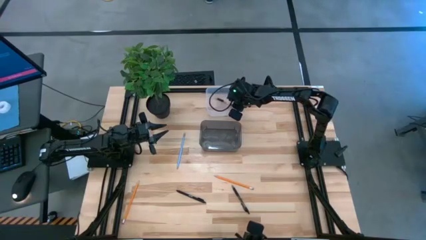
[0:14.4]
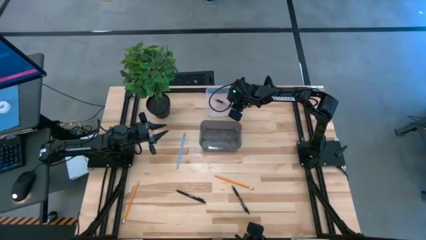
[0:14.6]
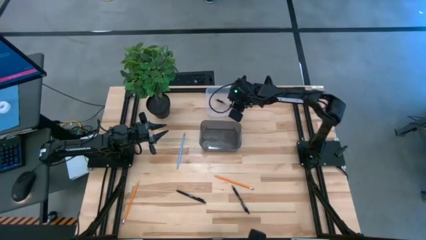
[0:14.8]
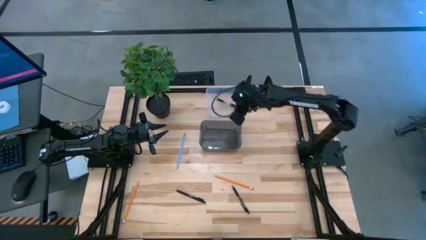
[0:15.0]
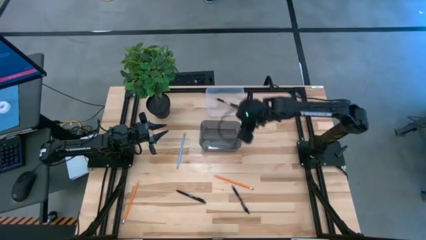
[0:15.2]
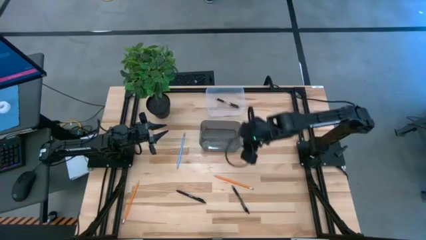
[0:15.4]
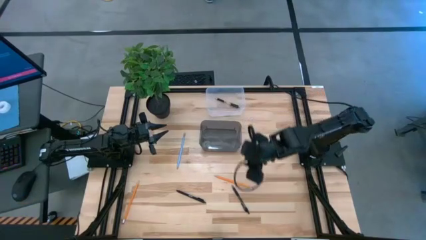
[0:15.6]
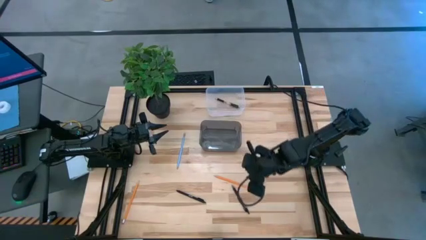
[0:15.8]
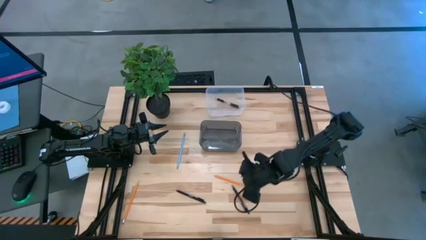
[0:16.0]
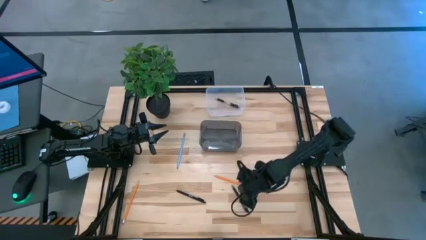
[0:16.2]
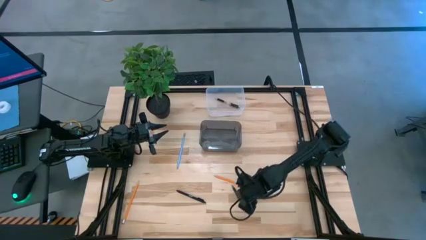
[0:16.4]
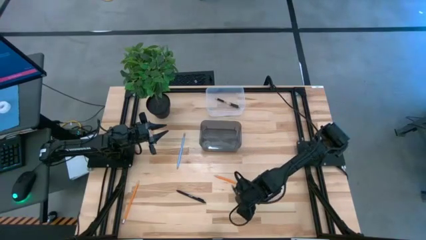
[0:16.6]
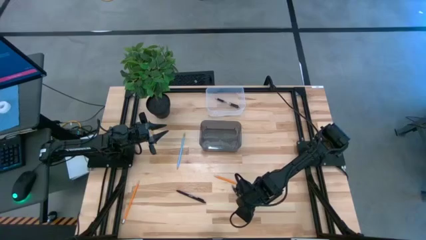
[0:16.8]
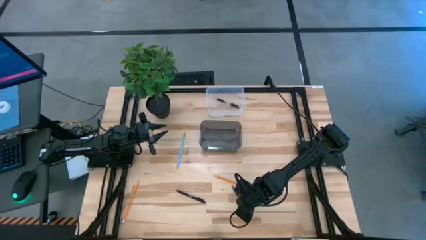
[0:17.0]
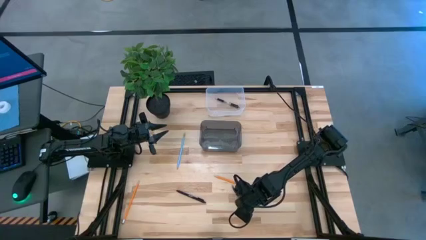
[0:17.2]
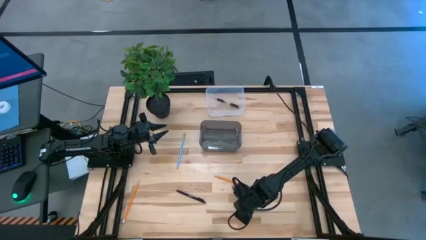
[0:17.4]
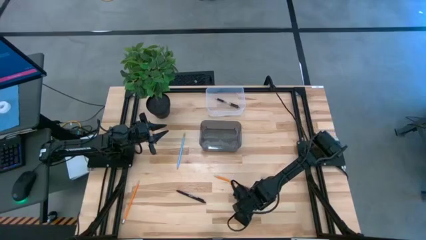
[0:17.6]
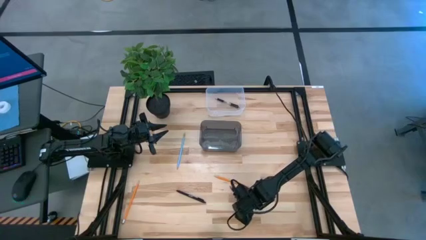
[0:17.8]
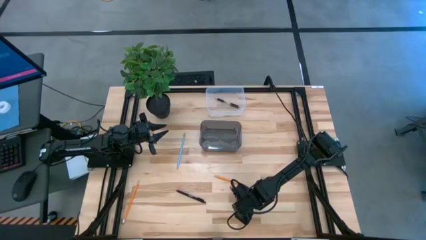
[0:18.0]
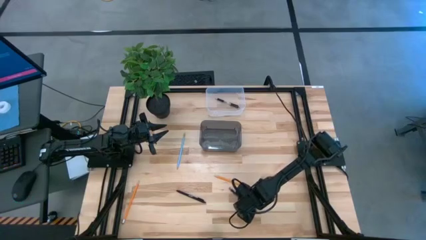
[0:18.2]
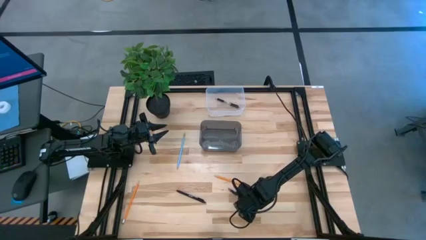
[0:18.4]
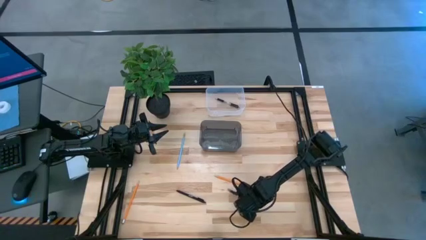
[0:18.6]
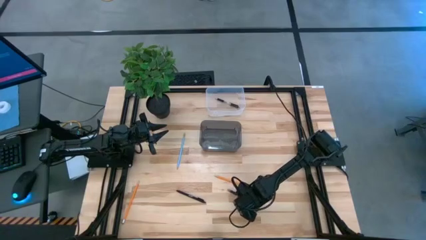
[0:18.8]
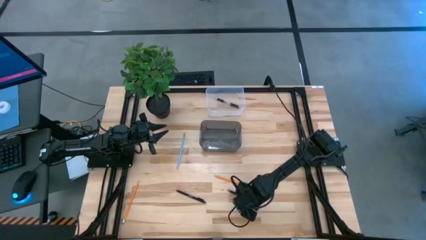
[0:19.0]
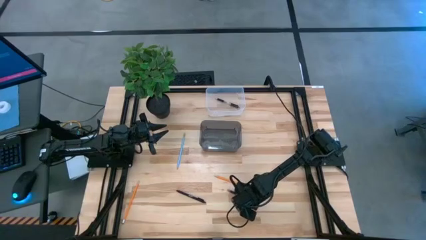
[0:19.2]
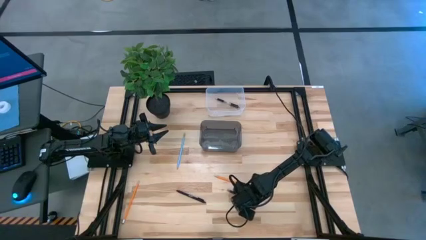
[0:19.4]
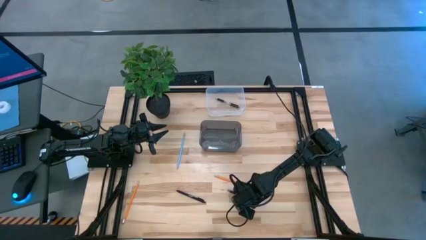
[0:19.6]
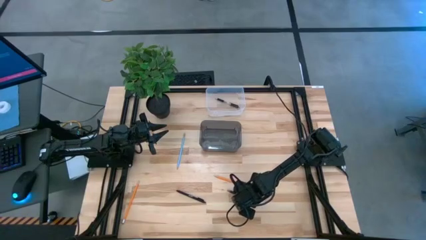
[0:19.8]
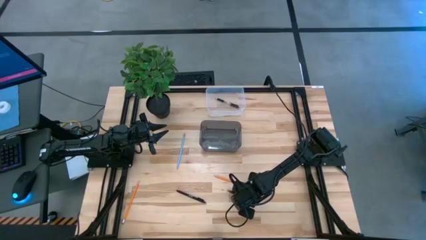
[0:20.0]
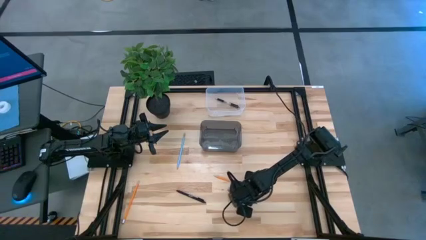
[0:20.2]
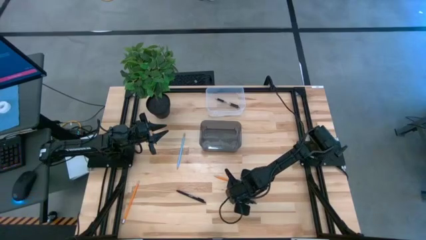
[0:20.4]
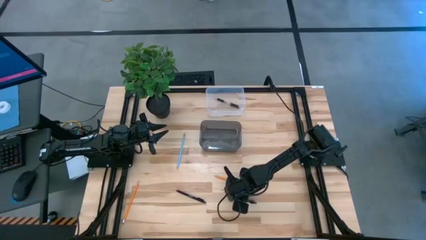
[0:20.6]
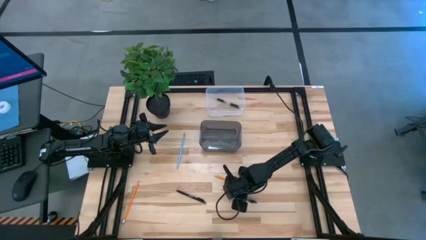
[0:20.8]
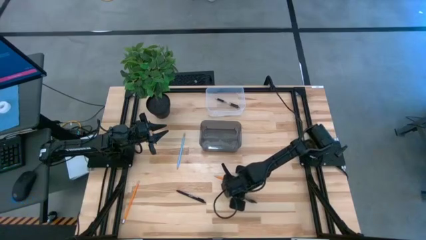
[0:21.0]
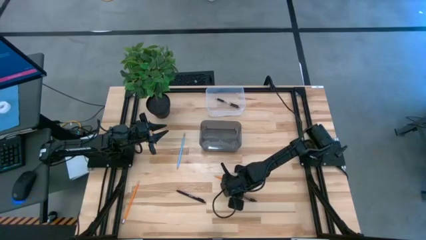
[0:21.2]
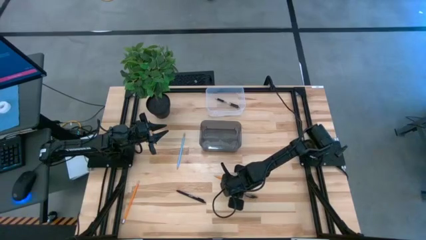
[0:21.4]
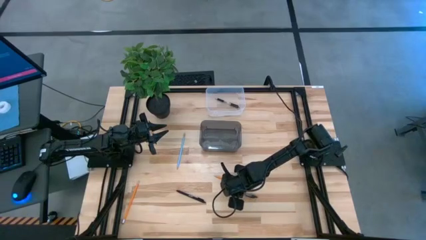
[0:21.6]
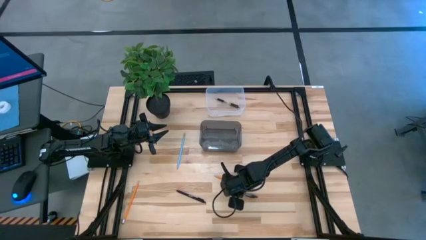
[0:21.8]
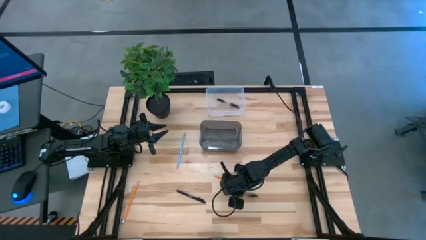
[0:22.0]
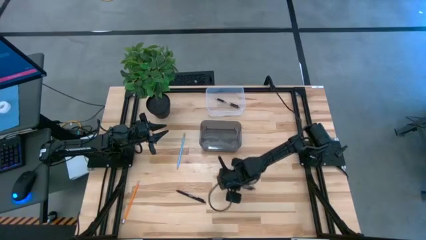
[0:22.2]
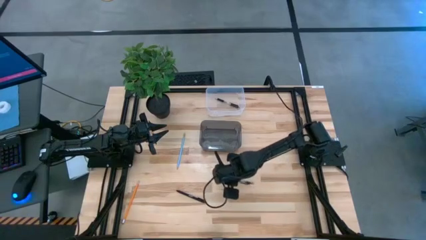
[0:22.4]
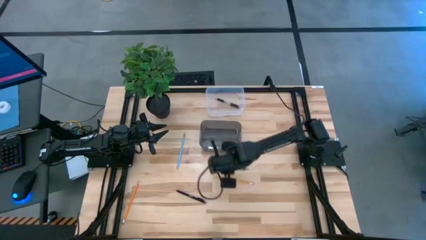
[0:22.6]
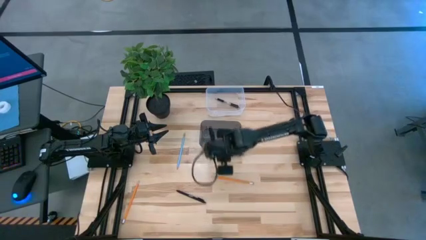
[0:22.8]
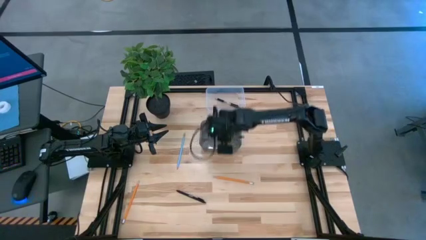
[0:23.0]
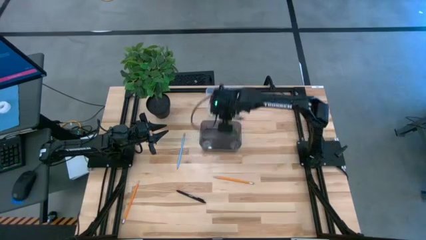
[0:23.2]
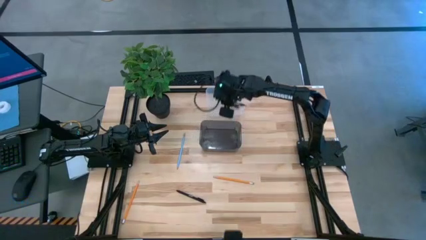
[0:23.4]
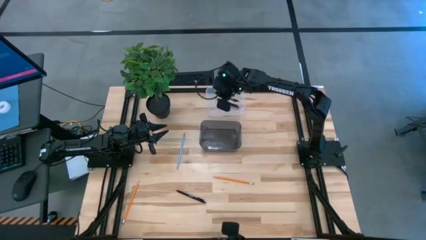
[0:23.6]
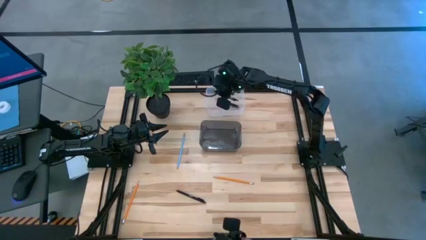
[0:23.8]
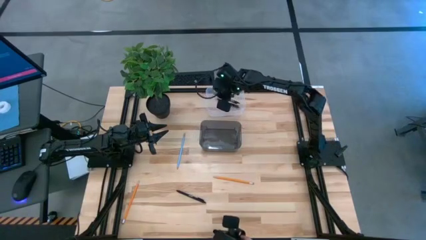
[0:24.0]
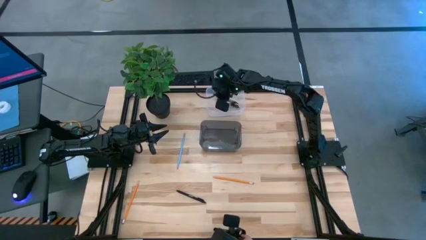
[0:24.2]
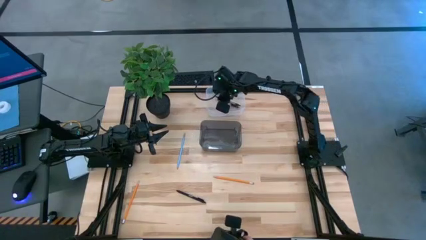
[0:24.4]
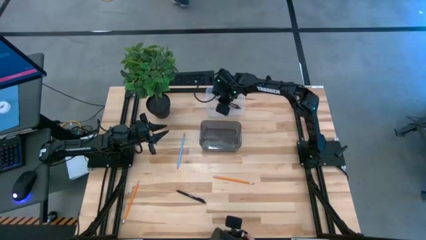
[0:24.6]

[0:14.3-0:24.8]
Task: Sort pens & pencils
Put the right black pen into the transparent bin
